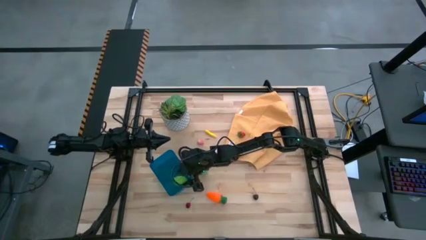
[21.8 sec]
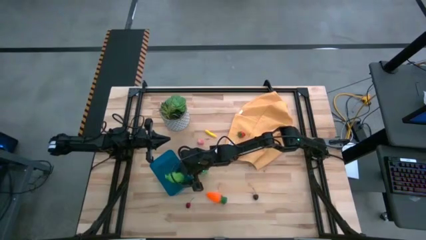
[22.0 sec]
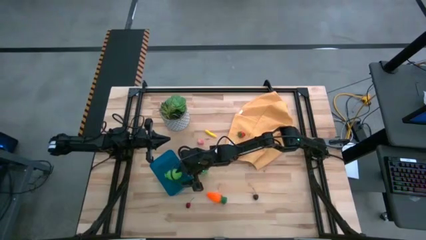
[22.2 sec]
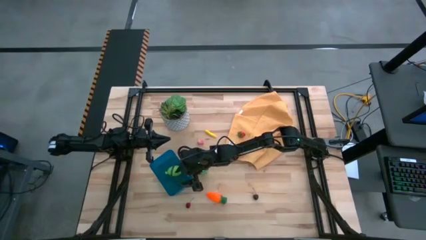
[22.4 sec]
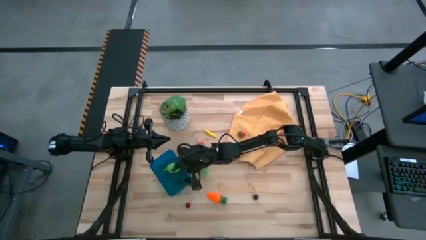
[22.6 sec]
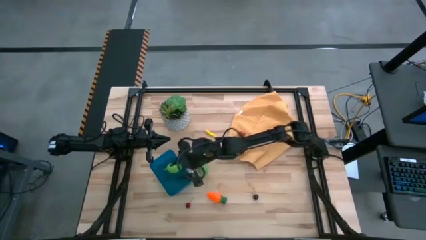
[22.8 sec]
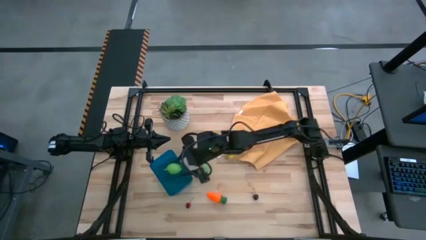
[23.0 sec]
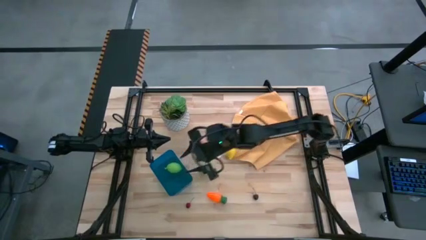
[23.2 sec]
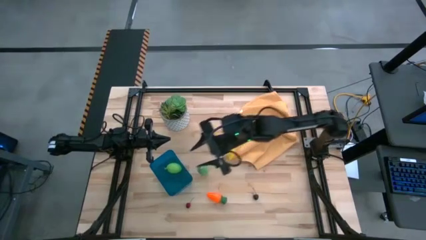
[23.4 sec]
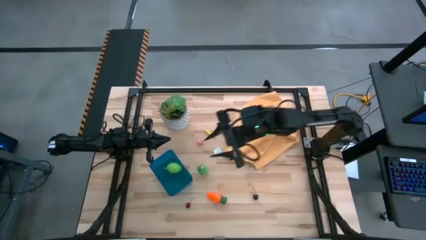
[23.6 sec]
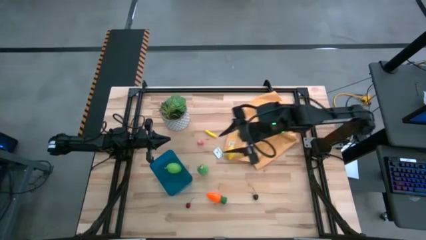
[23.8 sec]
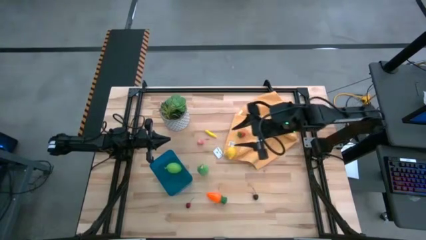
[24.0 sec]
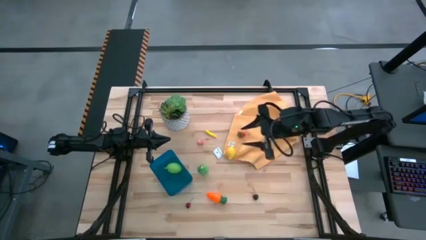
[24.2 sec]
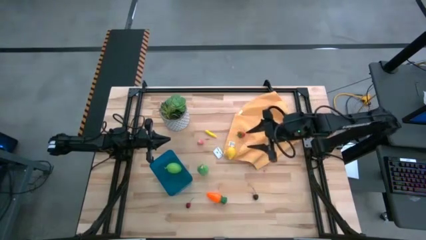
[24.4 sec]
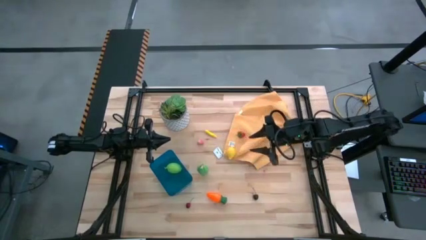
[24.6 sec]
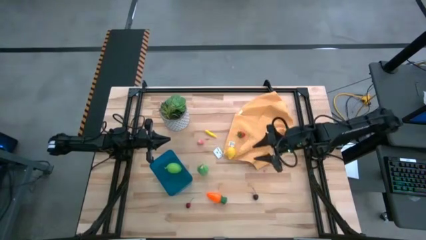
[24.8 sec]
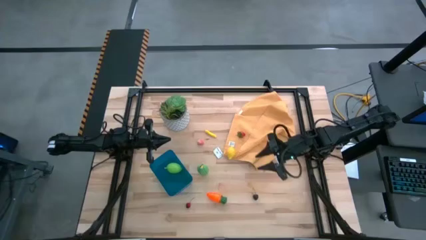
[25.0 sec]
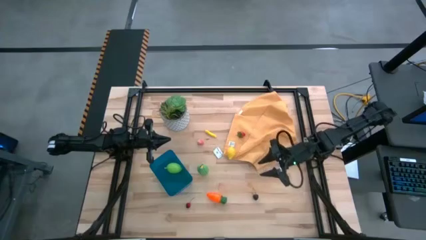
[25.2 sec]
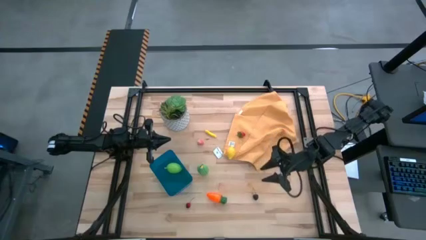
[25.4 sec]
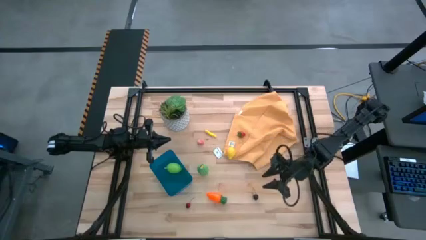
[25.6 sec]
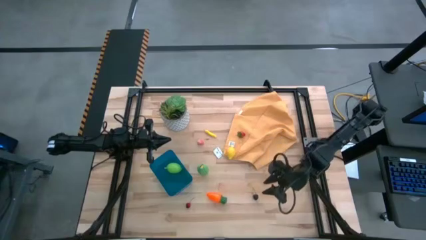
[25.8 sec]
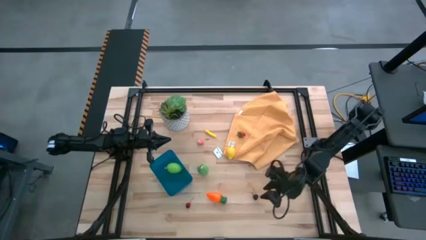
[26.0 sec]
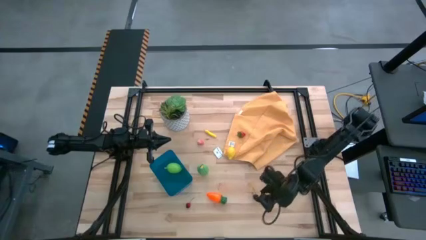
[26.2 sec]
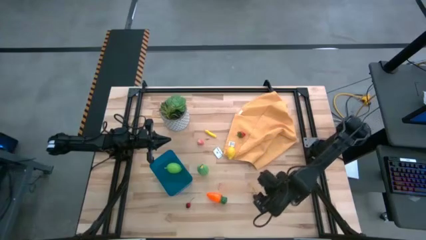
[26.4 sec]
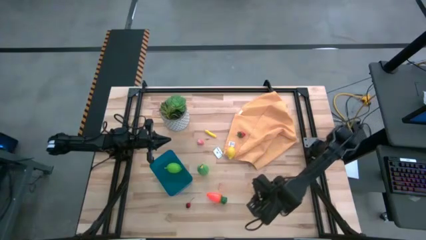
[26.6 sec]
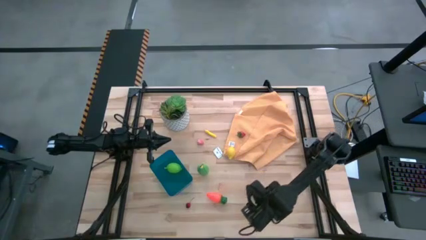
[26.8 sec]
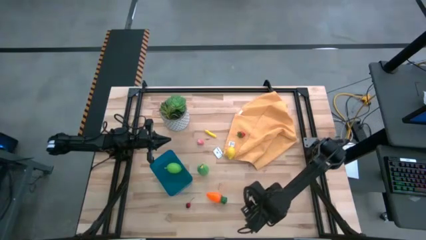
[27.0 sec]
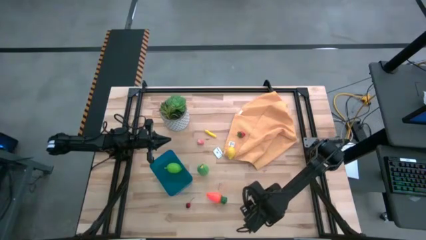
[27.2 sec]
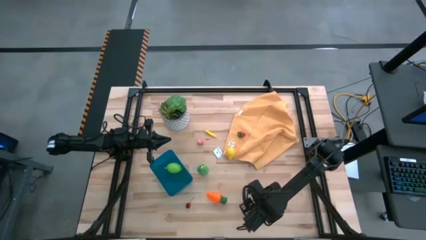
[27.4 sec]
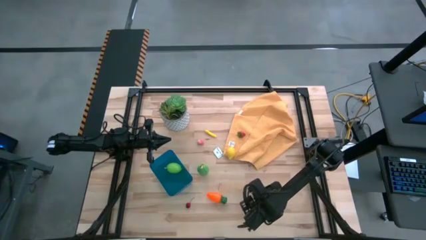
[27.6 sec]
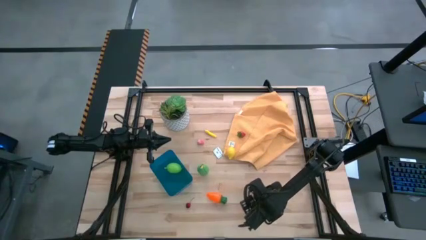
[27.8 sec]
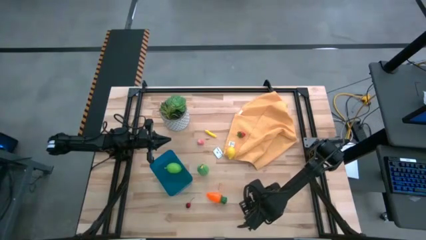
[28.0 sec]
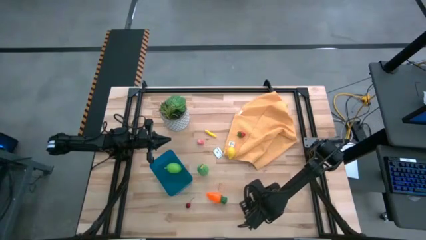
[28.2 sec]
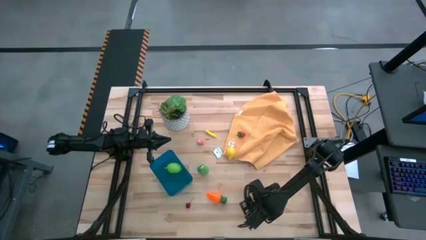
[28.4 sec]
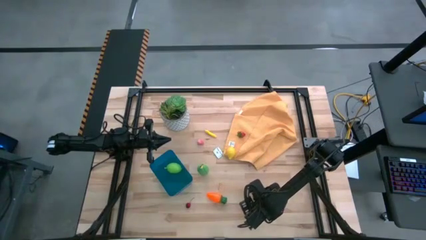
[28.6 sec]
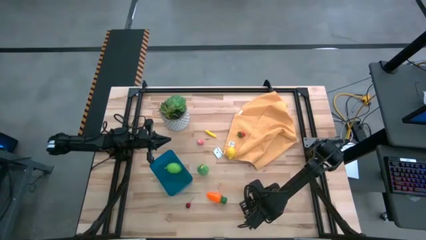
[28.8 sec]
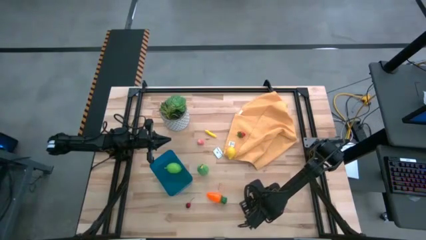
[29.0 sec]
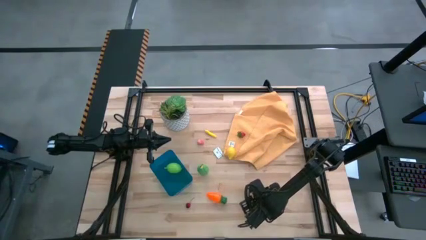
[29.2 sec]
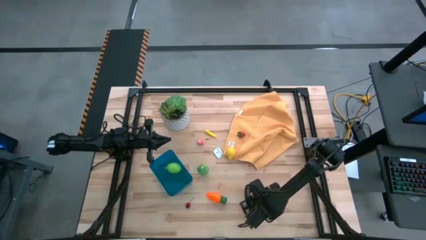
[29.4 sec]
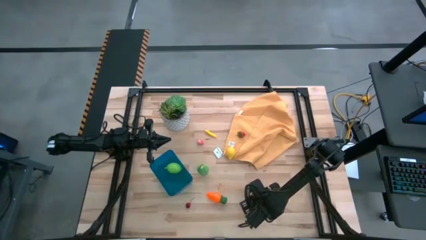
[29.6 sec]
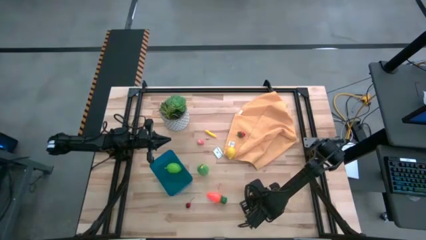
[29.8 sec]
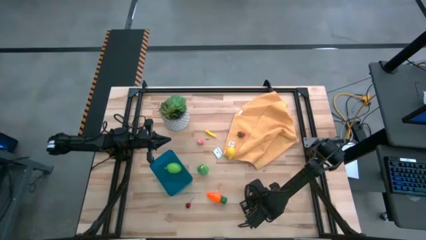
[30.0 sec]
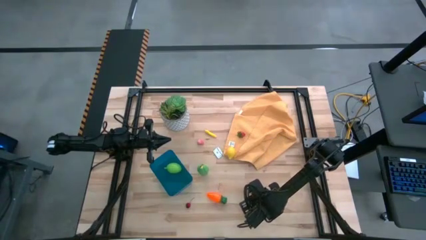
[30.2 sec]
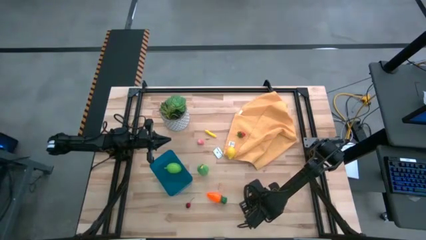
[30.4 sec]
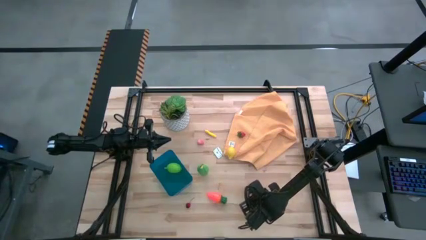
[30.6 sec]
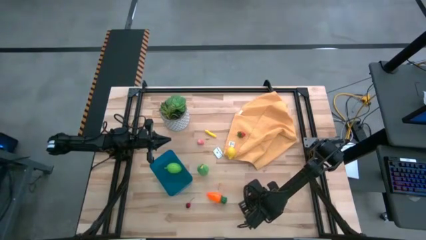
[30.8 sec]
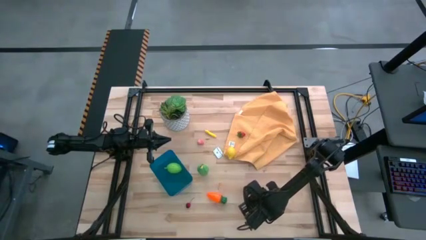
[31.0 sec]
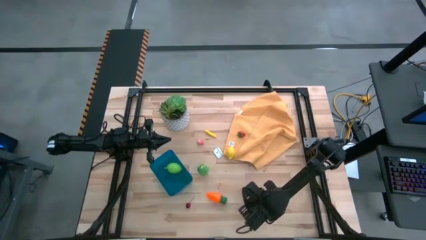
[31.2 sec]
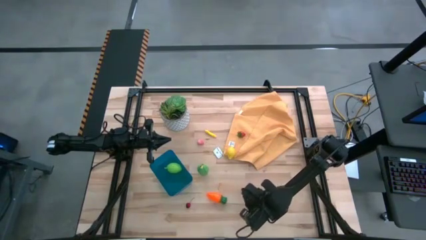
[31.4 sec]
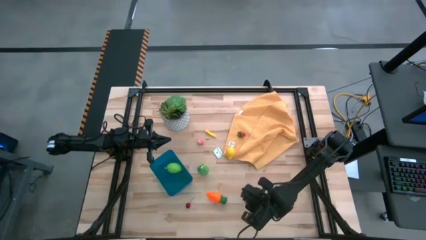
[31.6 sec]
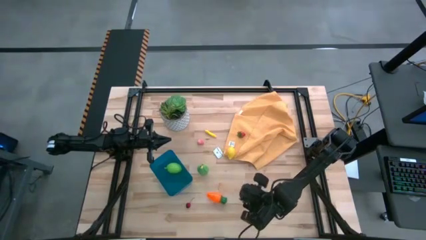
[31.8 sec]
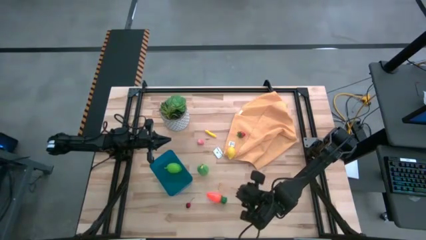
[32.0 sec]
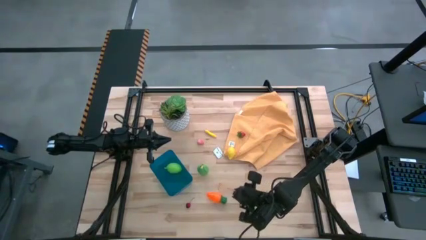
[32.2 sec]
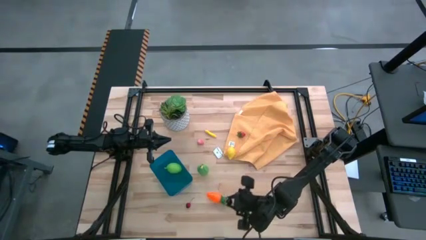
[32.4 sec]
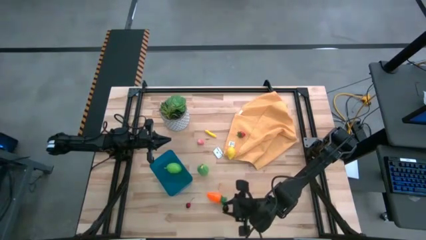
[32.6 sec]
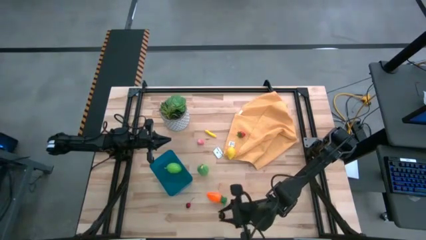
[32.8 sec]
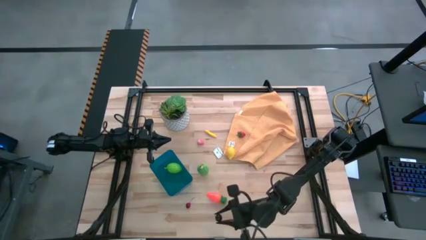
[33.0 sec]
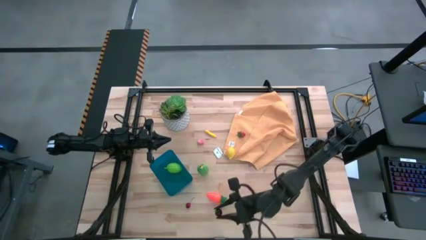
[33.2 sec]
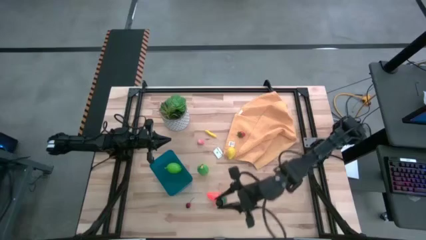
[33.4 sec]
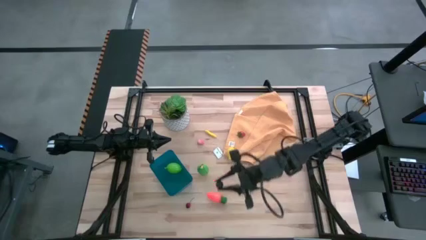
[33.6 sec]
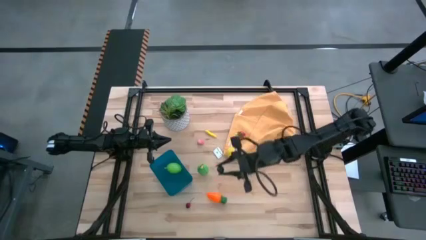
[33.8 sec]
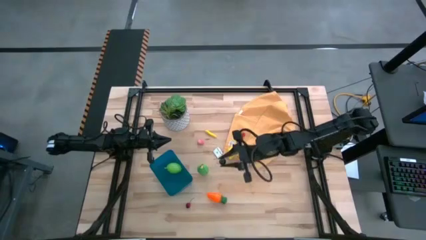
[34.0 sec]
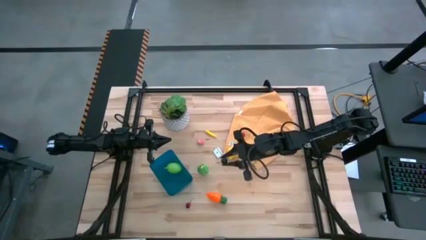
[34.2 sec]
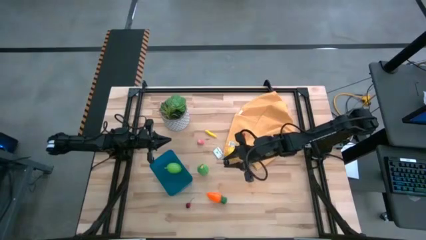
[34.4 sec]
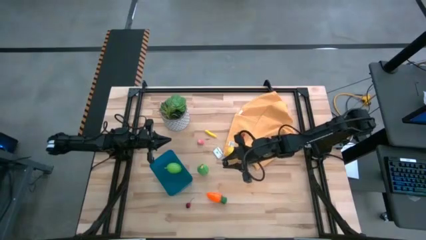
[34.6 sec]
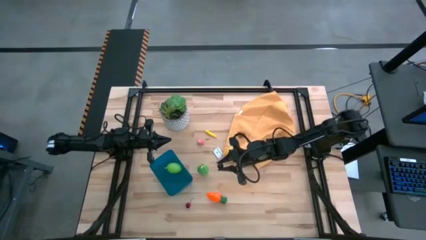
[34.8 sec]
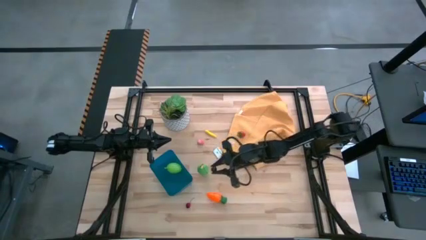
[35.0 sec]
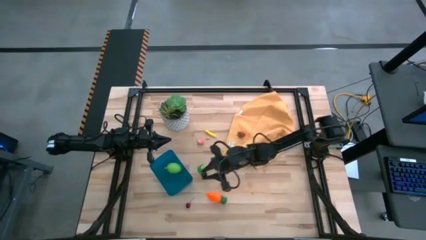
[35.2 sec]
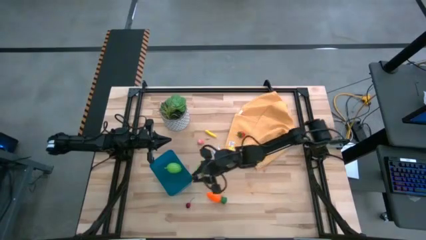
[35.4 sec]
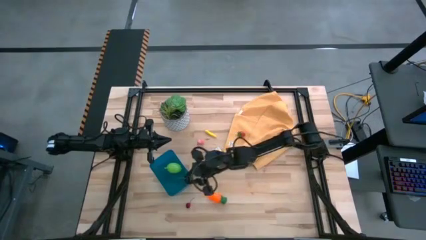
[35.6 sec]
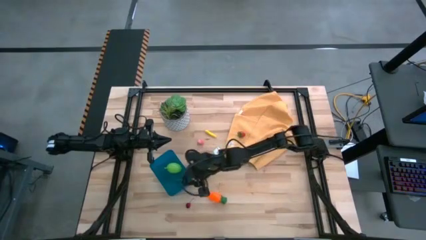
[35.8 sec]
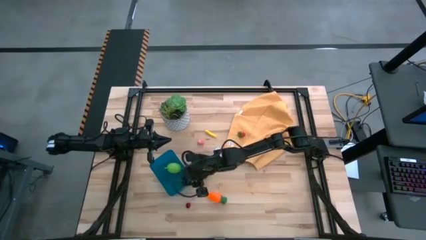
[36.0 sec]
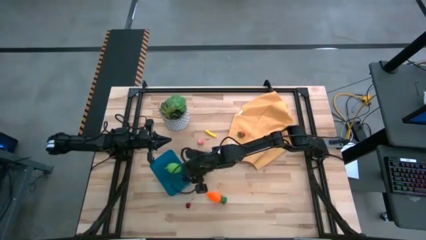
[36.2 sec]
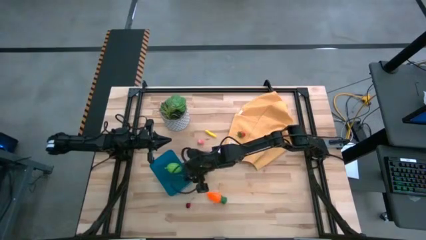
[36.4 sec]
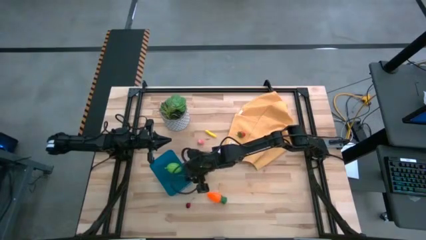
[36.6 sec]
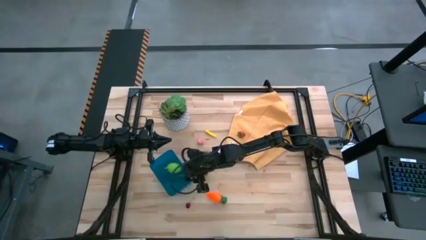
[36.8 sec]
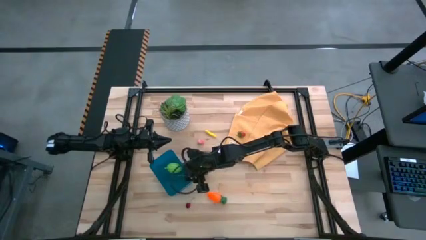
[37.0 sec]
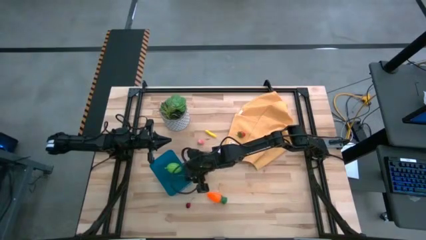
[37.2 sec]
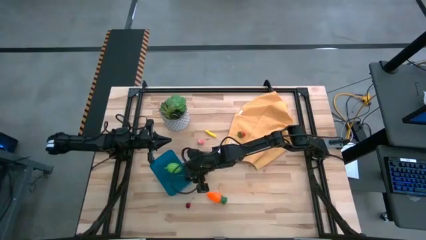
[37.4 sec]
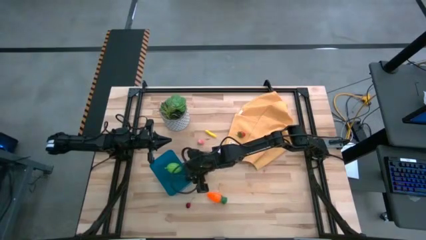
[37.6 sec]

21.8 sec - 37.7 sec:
Task: Pick and placing Produce into tupperware
Put the black cherry into the blue bin
